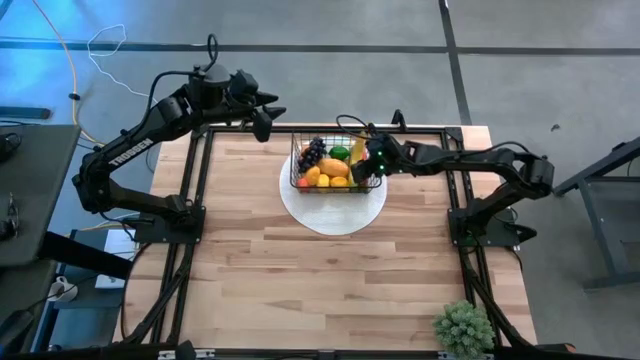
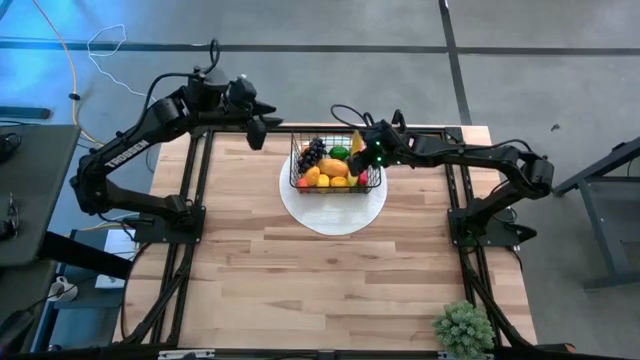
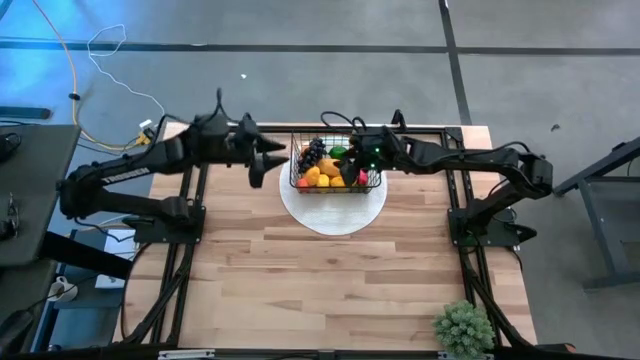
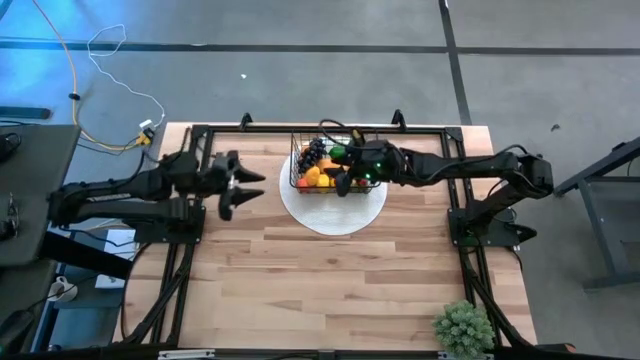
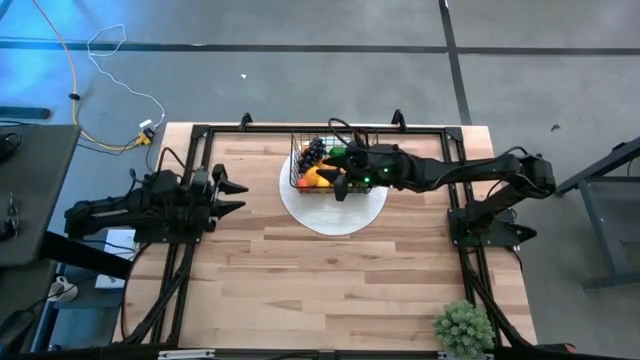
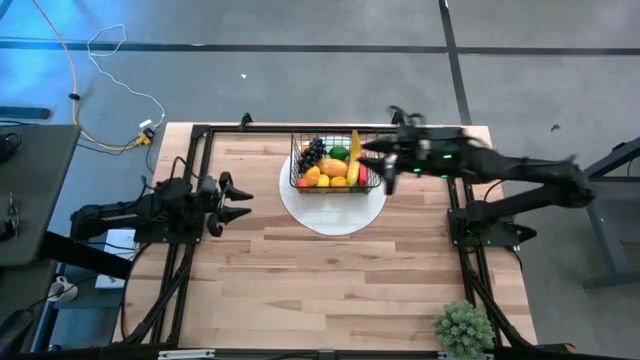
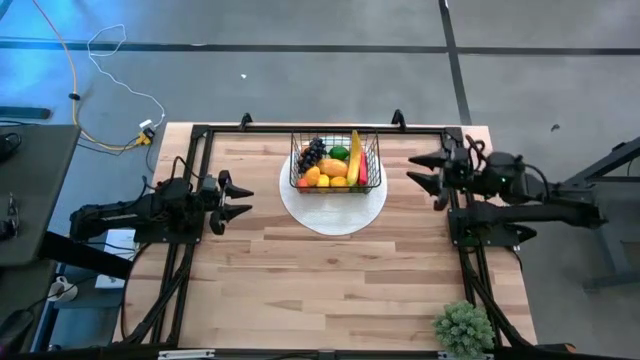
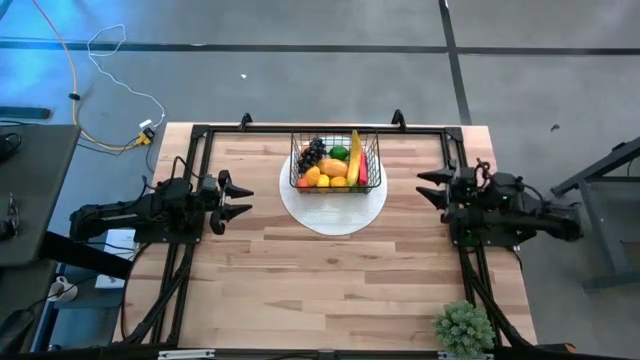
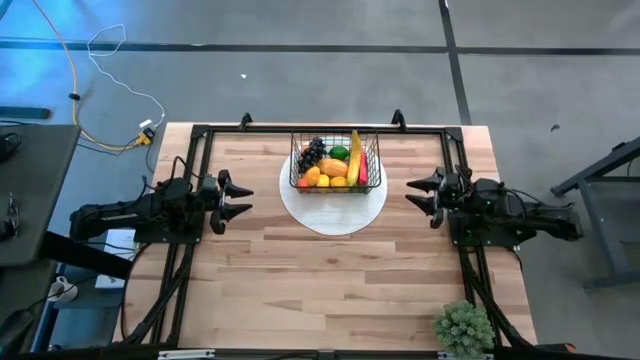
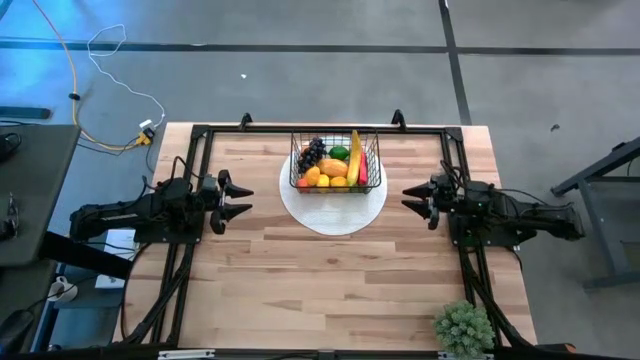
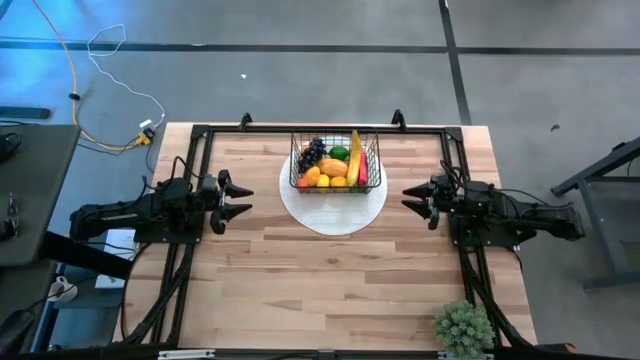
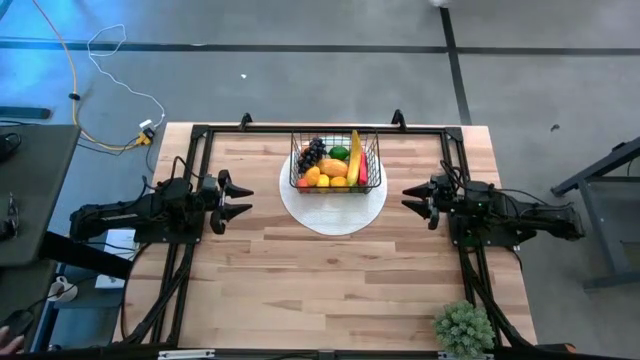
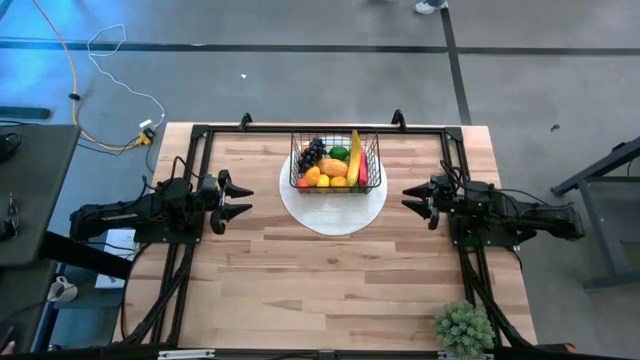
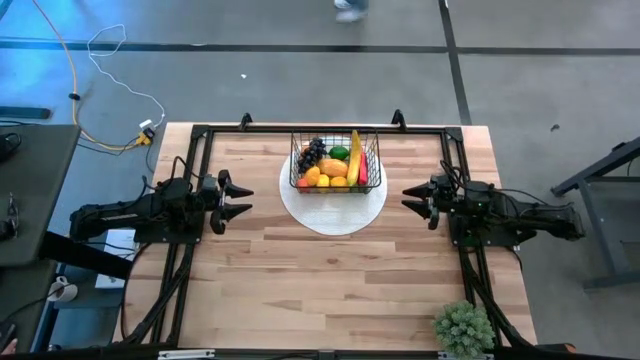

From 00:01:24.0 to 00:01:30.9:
Task: Build produce basket
Return to Home Position

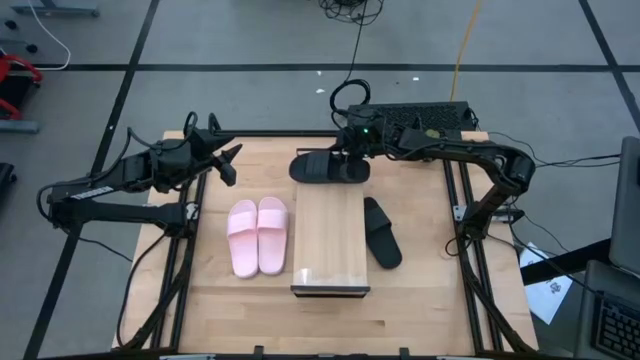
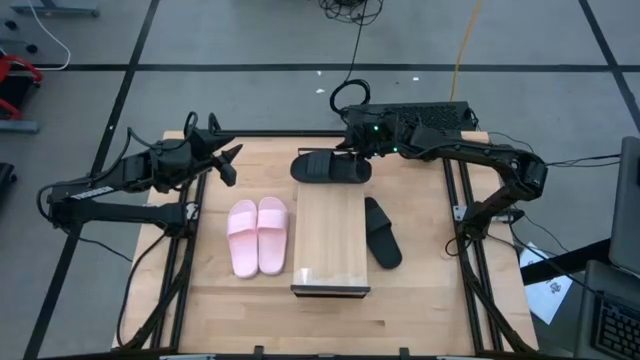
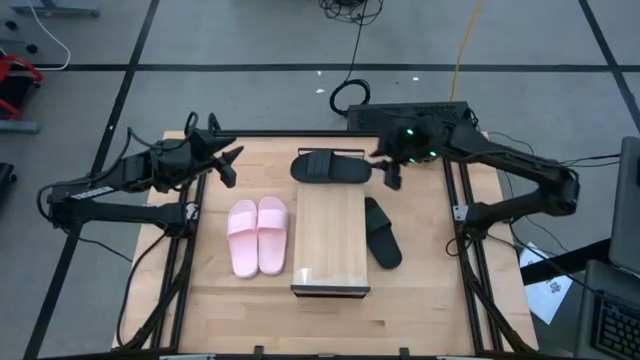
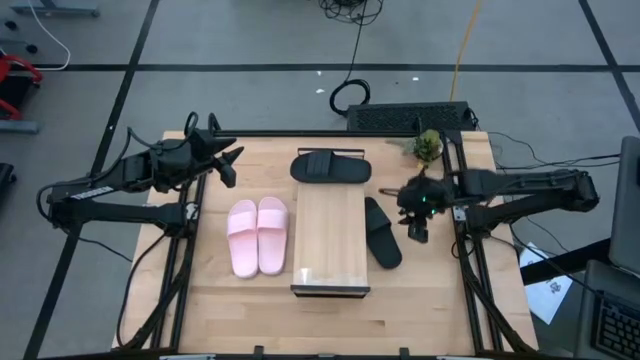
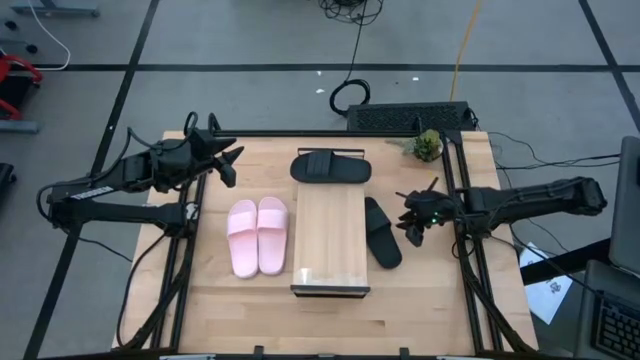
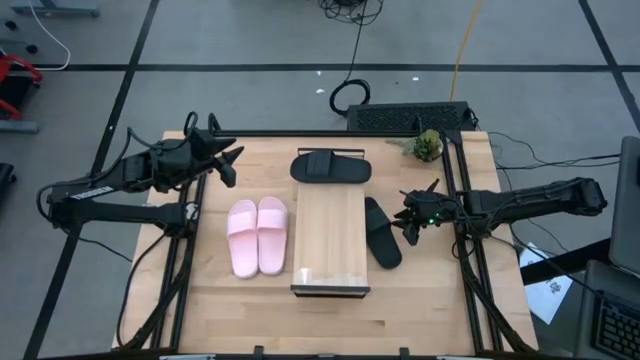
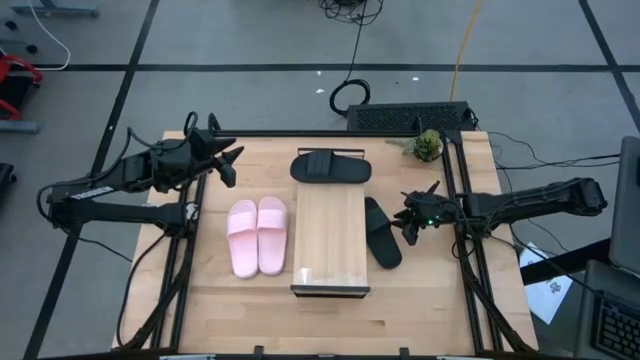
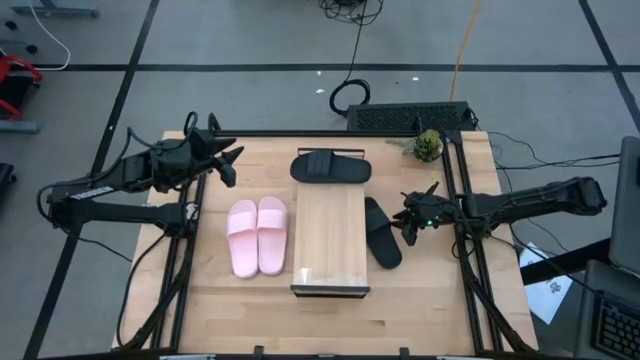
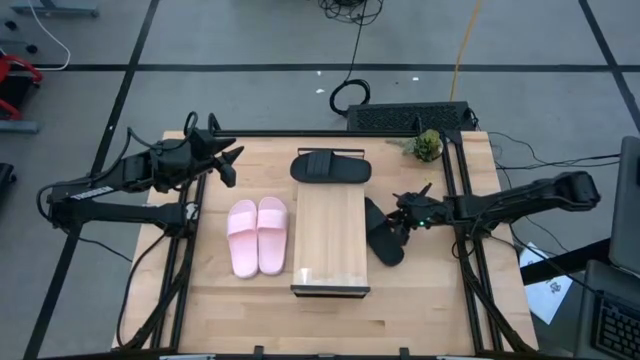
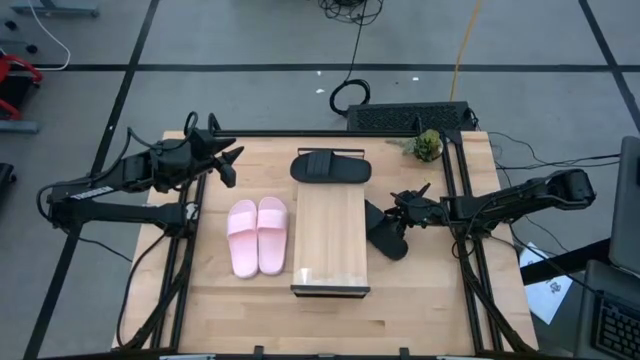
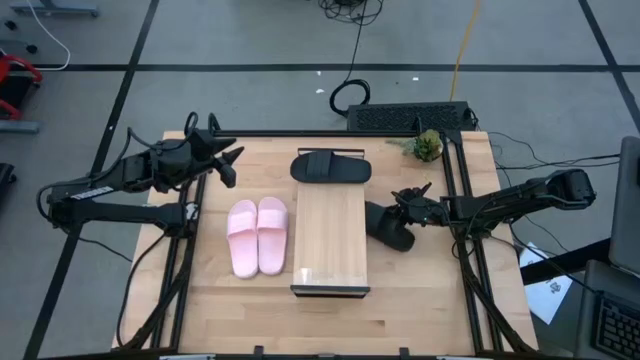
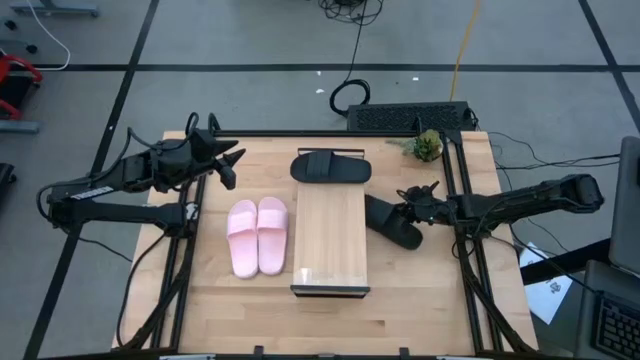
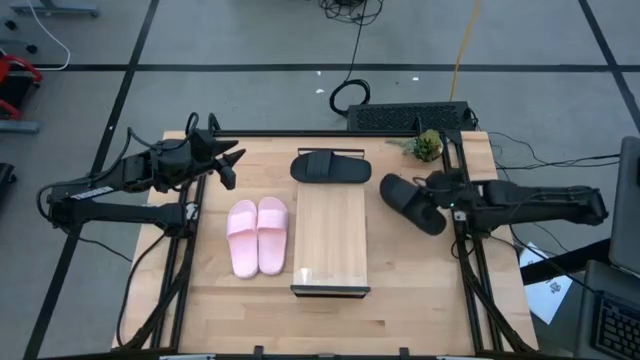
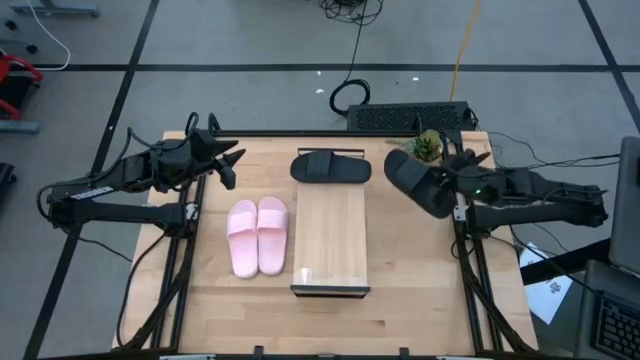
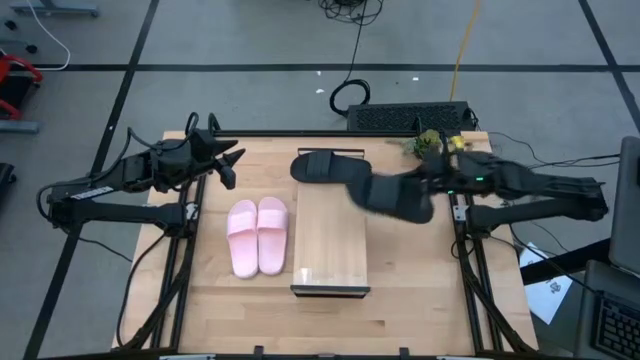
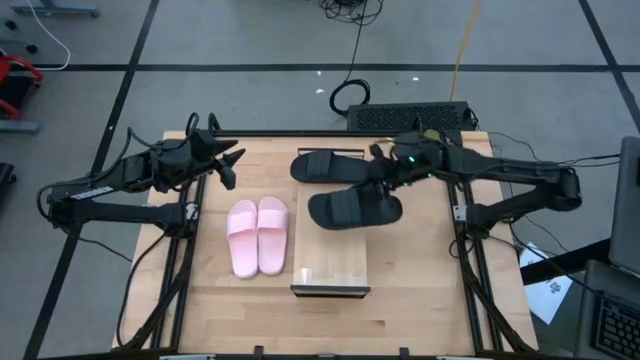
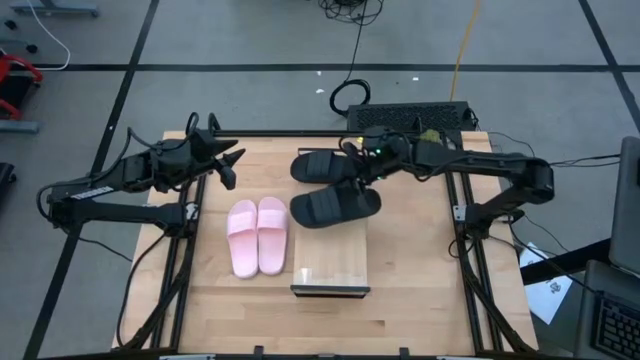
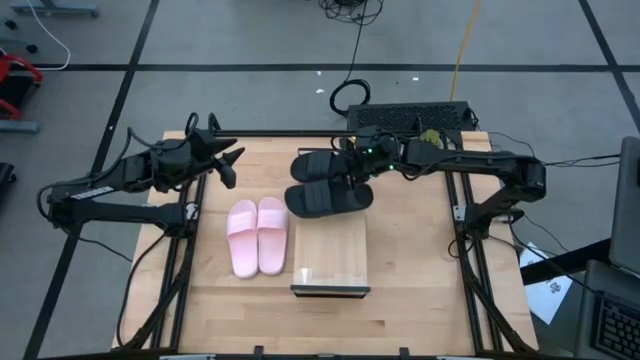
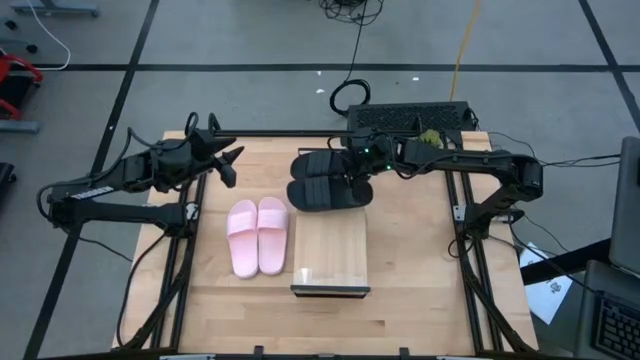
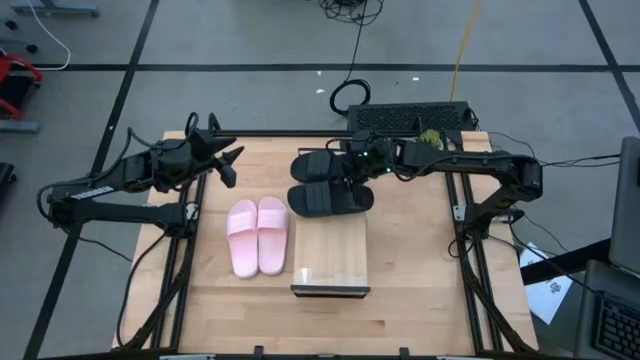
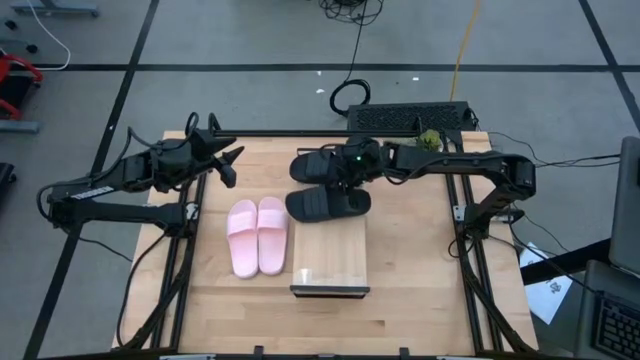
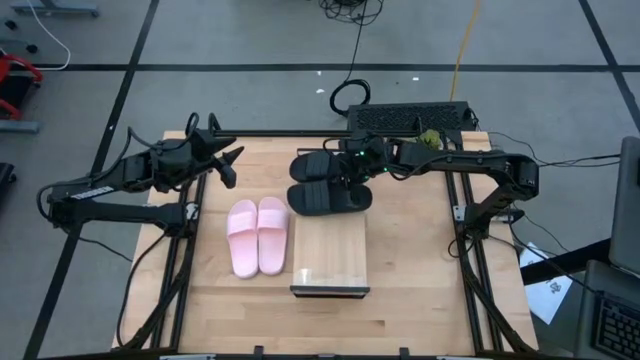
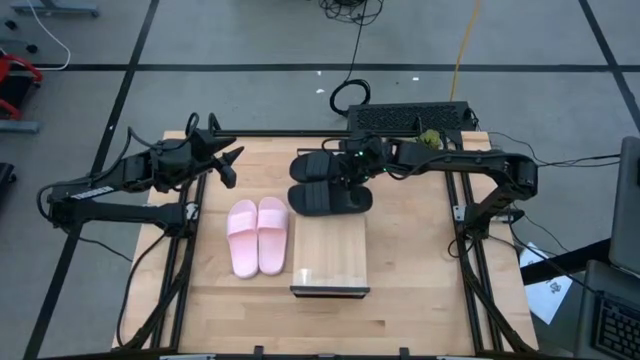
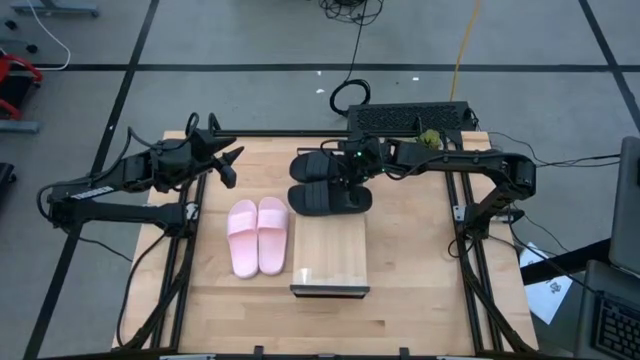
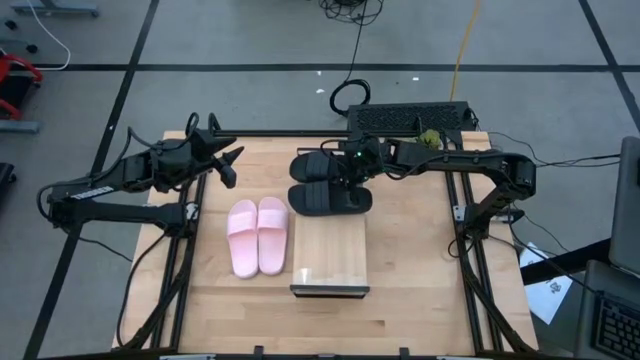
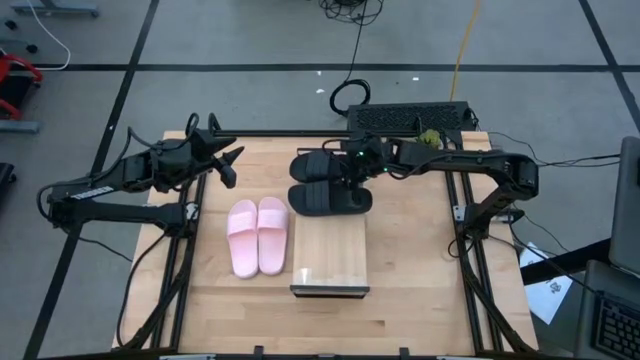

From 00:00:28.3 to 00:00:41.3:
Task: Pick and place slides into the shelf
Put the black slide on the shelf
